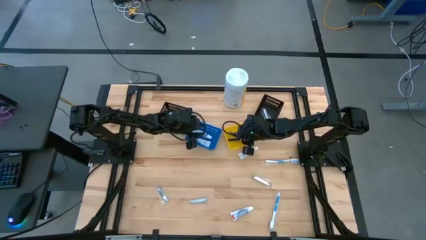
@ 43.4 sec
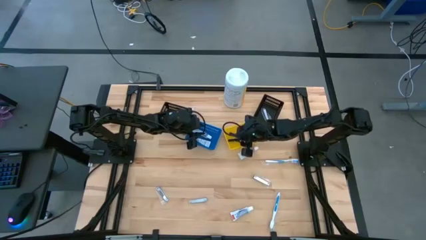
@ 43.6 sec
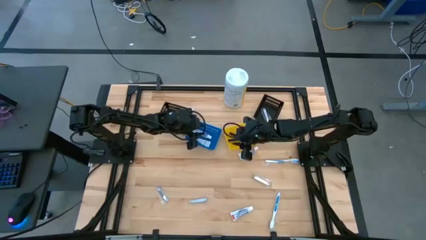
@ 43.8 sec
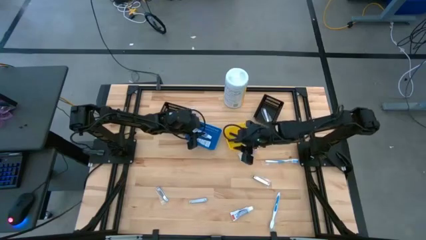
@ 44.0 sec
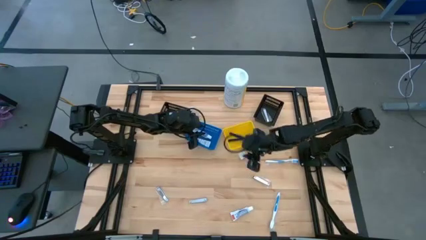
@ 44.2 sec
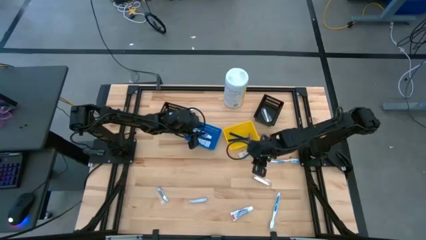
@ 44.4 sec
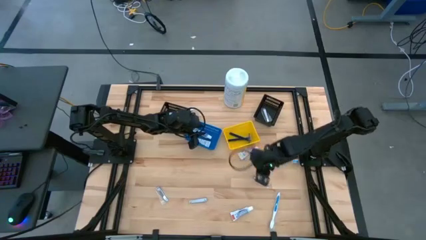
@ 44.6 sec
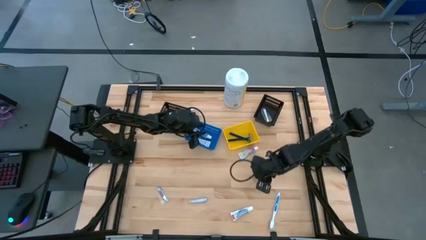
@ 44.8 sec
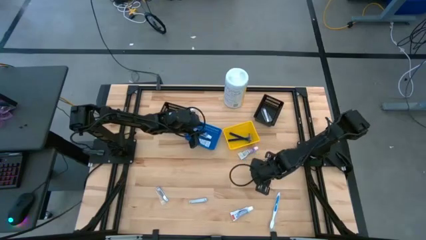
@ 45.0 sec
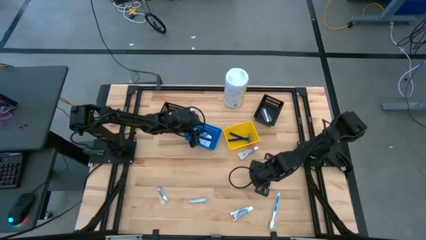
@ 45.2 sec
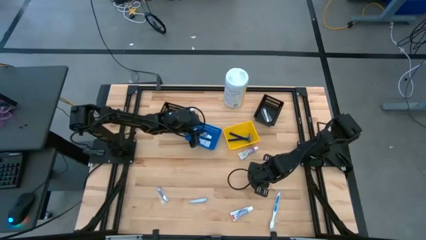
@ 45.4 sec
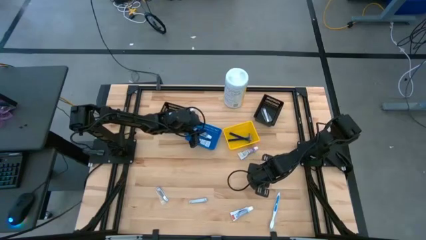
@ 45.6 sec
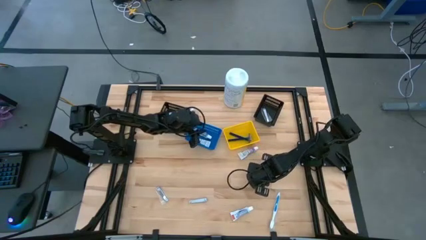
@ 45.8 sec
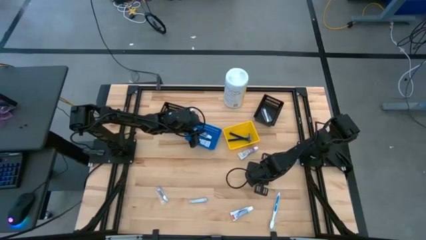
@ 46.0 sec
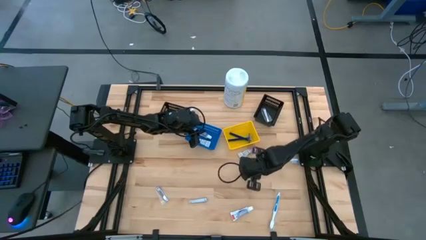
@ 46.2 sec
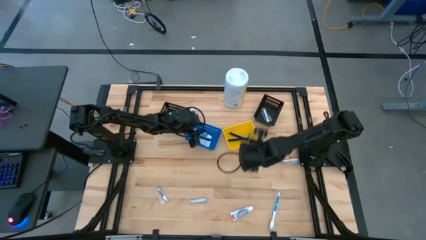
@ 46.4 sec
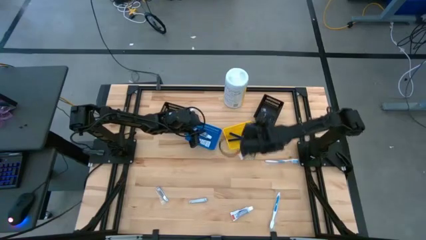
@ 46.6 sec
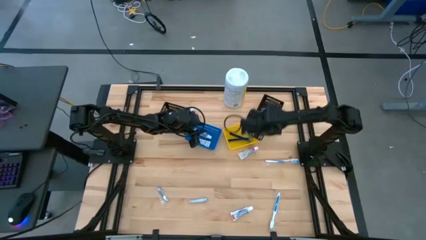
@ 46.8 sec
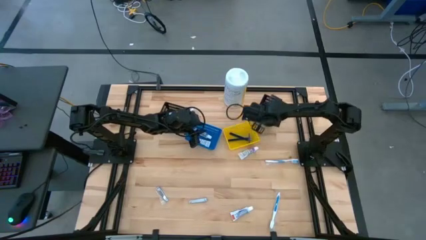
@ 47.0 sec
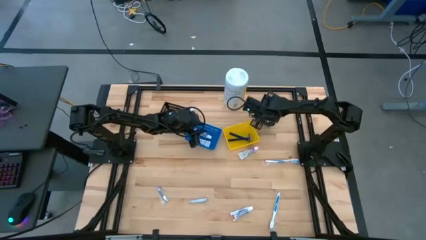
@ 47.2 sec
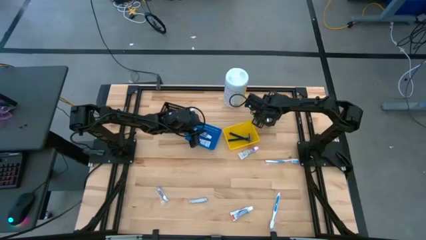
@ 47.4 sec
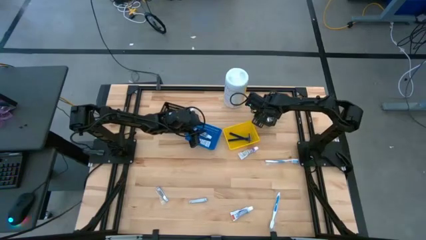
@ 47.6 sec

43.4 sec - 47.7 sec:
Task: Pick & Place Travel size toiletries
Put the silver nail cutter into the right black bin

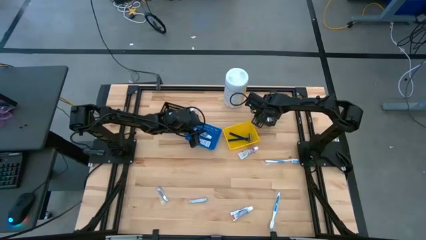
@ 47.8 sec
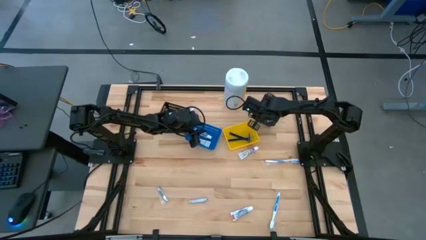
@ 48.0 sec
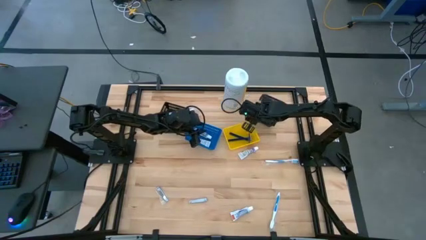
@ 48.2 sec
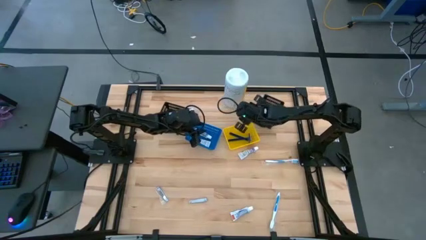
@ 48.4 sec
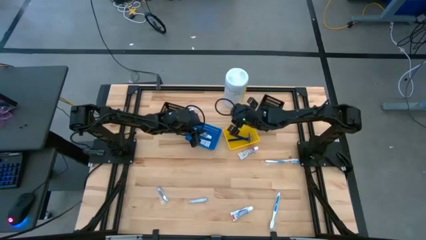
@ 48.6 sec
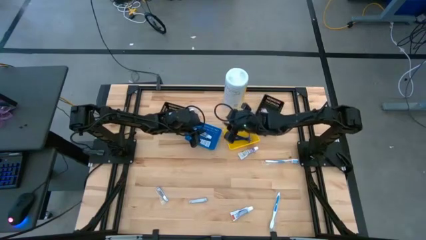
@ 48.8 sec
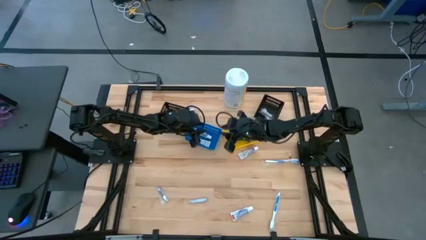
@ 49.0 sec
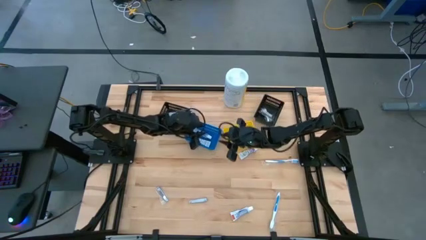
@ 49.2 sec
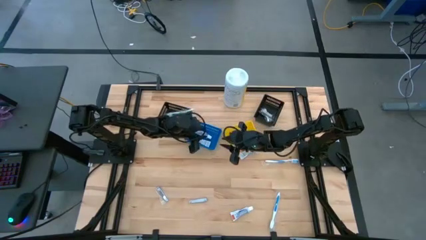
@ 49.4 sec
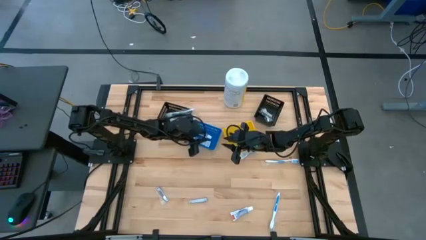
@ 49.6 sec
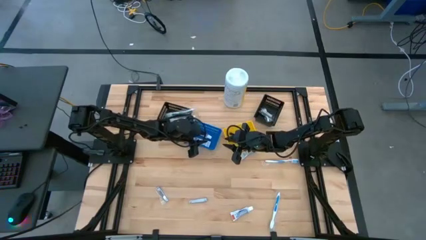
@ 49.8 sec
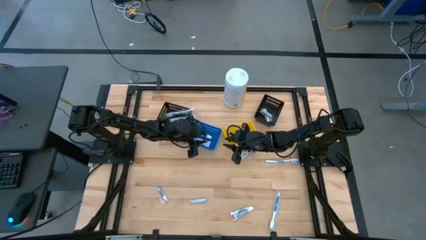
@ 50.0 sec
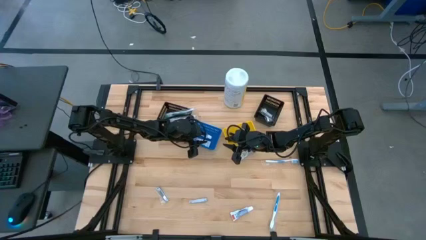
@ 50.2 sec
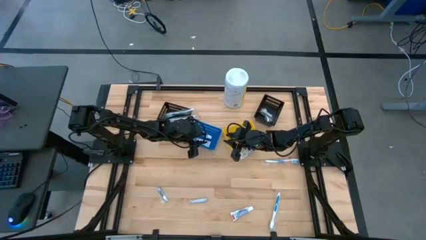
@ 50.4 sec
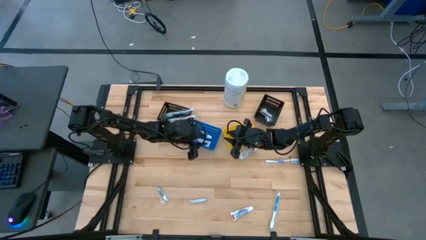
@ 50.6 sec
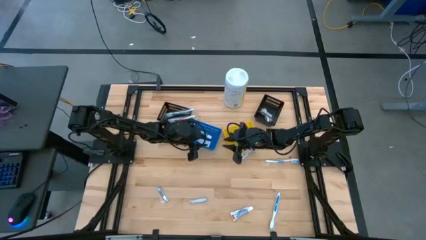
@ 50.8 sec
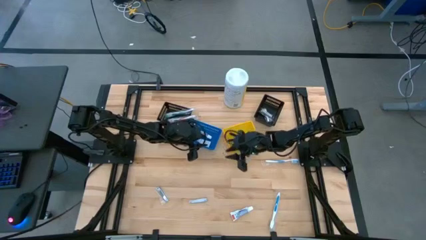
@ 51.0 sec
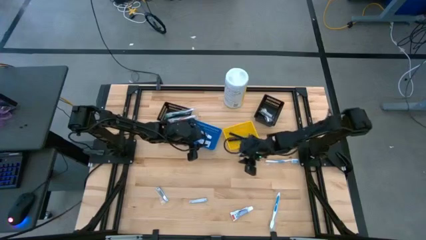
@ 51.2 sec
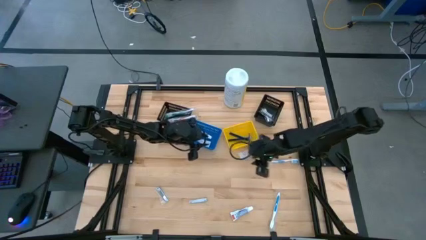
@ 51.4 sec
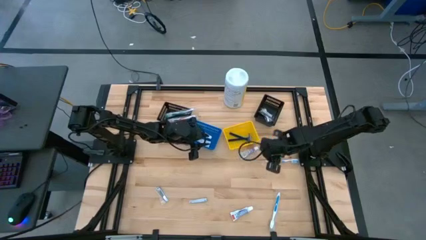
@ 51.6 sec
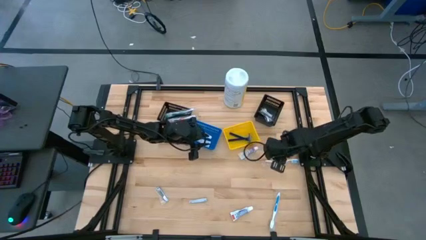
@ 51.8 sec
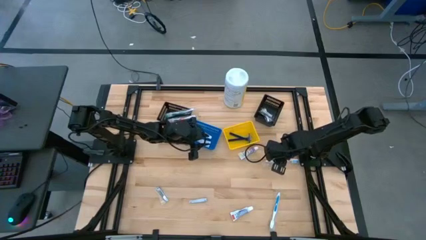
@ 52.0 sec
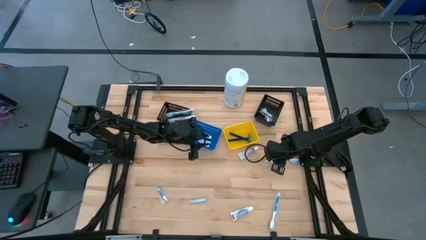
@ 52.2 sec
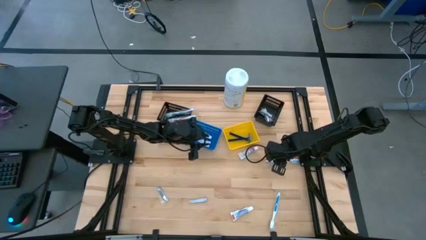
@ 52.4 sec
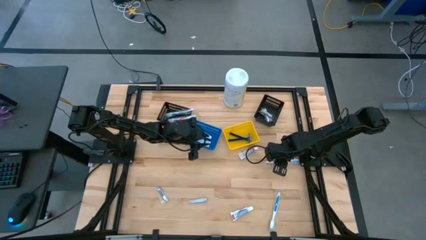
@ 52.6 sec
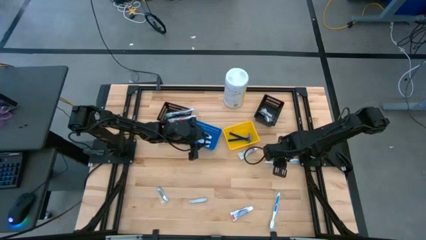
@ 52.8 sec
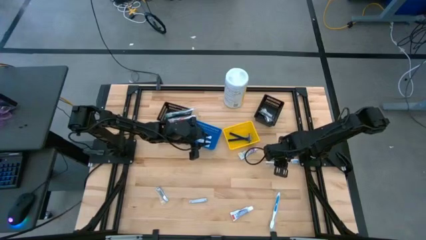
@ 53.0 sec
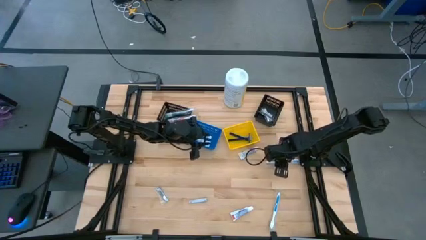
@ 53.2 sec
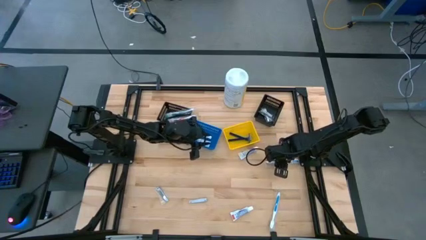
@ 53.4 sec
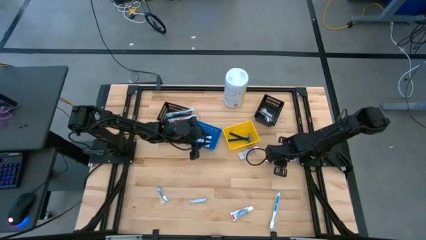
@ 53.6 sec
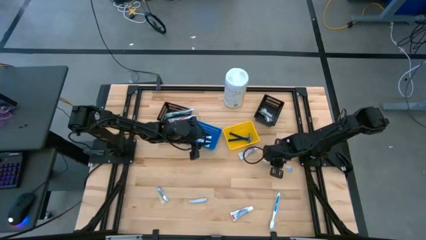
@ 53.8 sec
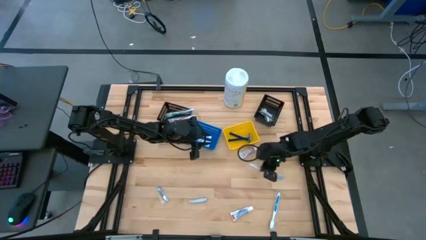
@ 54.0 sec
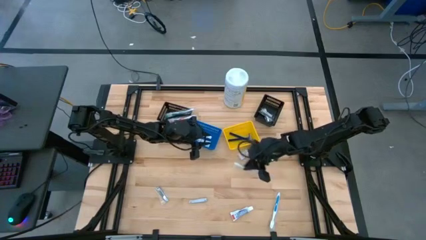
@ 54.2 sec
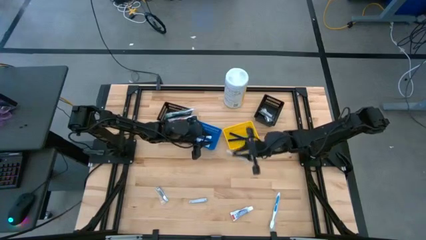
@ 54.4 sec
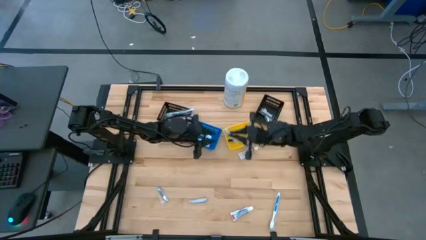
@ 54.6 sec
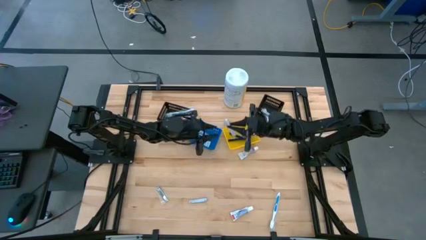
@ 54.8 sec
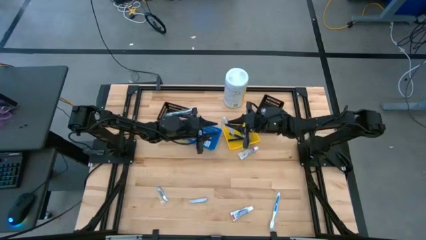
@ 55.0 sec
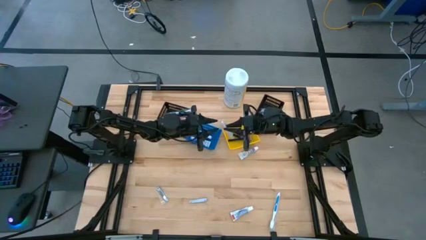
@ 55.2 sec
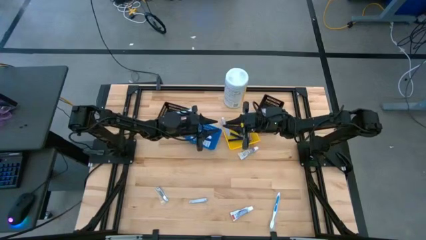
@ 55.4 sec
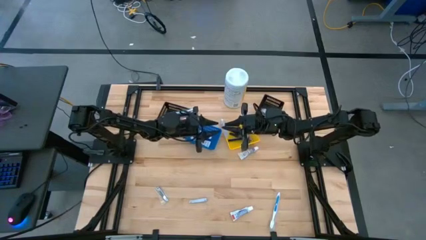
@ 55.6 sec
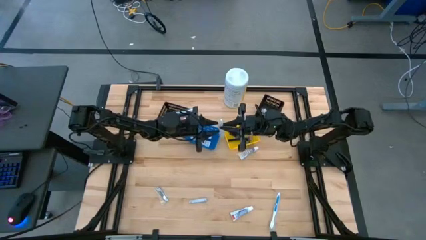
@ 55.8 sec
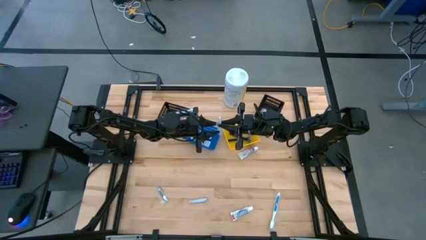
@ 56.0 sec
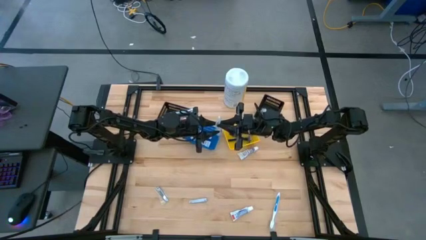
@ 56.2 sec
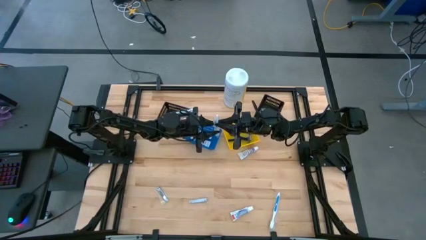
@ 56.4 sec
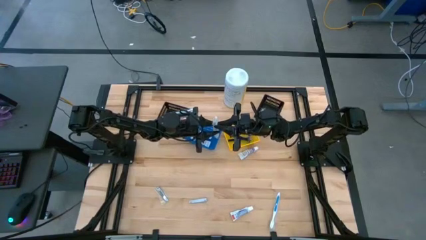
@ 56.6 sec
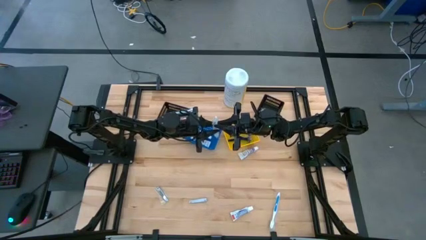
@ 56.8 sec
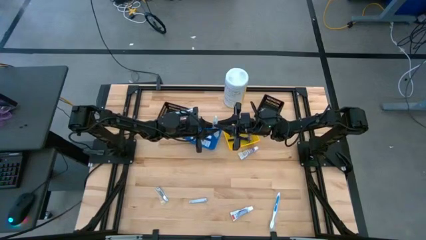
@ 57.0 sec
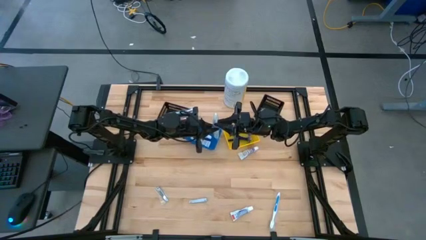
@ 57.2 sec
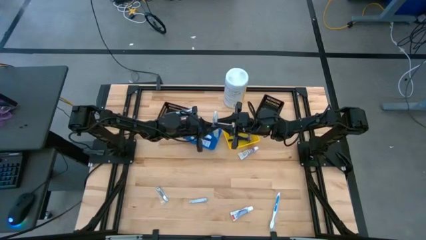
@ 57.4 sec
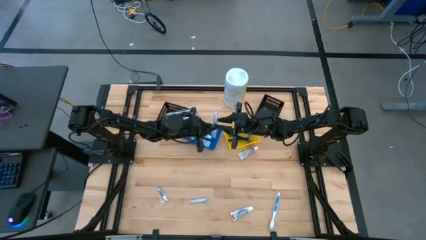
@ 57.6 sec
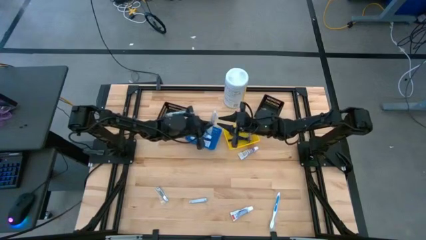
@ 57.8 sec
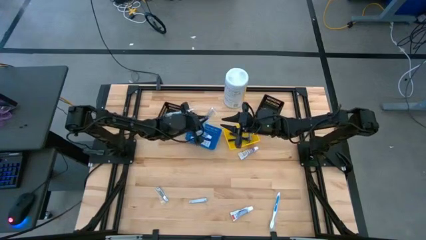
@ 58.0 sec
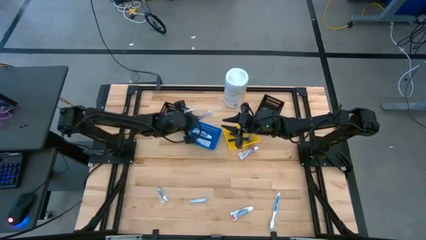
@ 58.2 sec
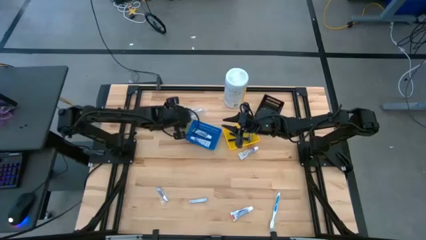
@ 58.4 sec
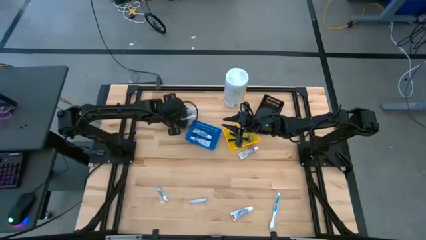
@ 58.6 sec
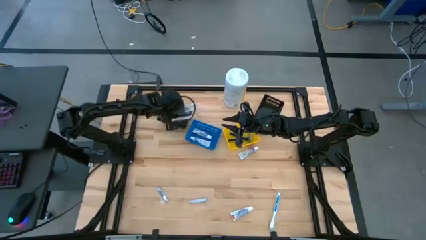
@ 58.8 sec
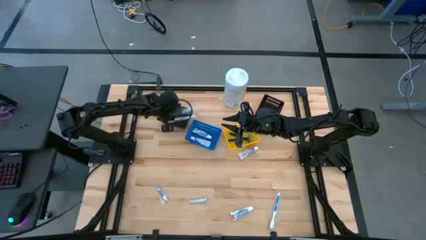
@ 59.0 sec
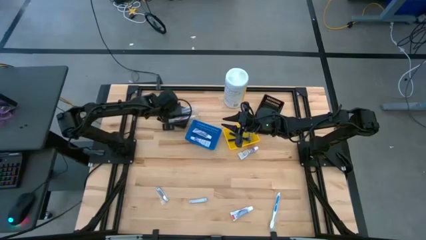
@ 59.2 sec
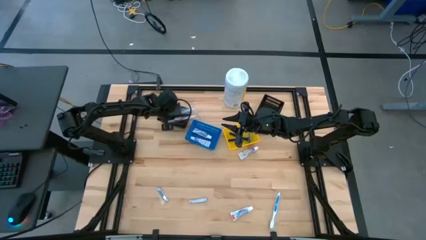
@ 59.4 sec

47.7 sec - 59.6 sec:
Put the blue toothbrush into the left black bin
